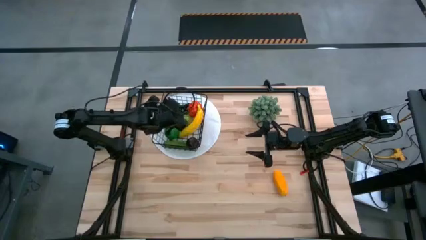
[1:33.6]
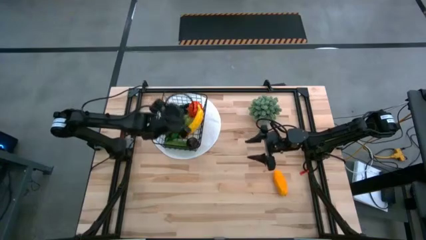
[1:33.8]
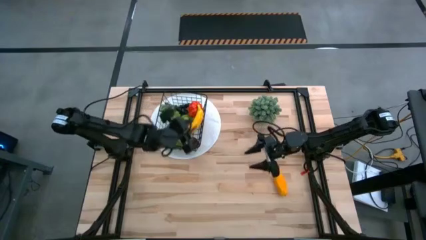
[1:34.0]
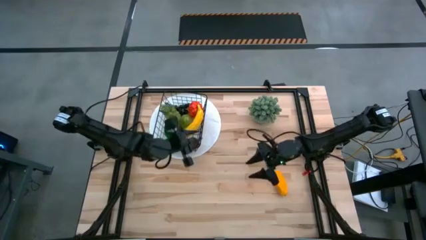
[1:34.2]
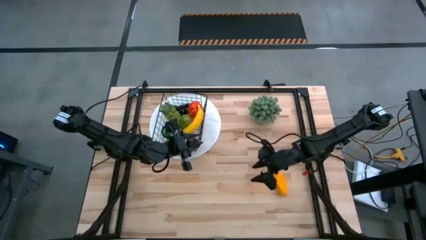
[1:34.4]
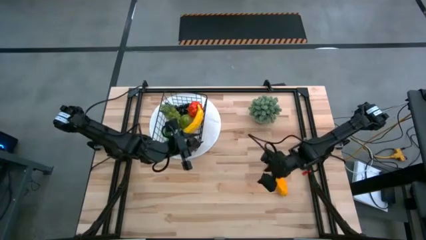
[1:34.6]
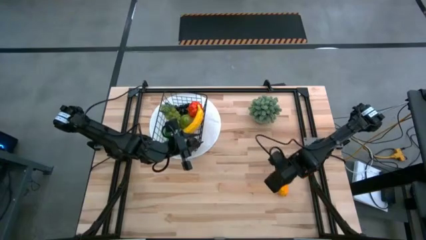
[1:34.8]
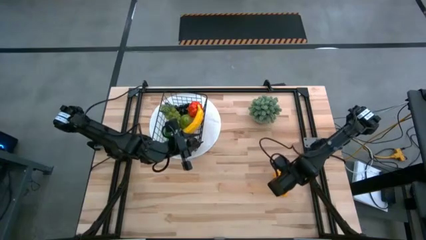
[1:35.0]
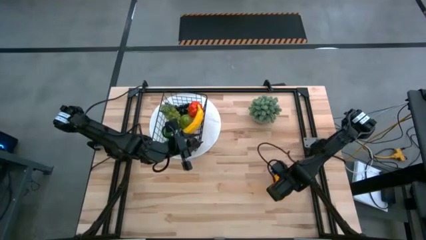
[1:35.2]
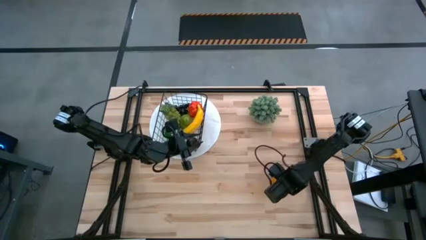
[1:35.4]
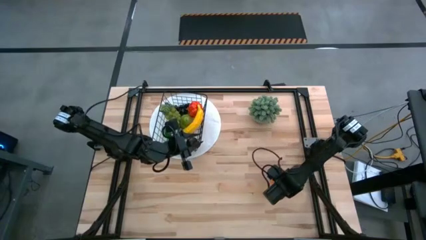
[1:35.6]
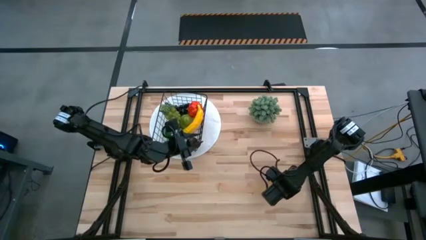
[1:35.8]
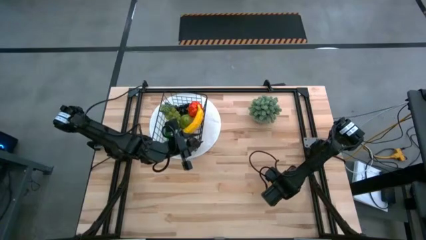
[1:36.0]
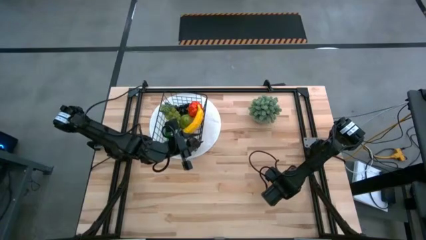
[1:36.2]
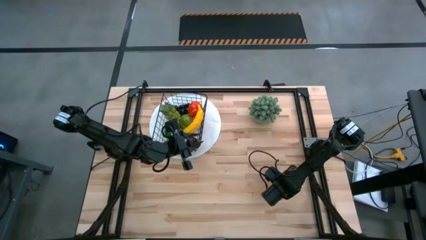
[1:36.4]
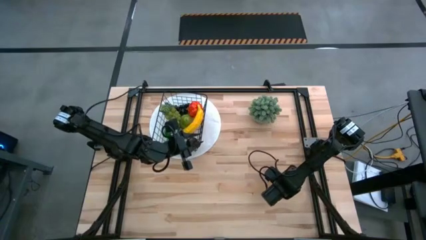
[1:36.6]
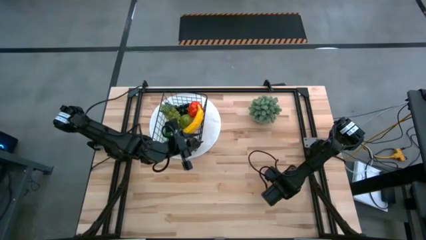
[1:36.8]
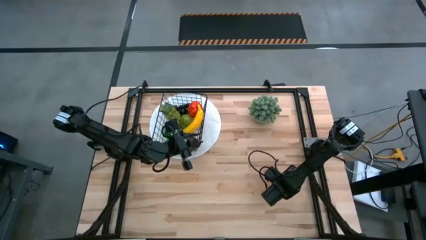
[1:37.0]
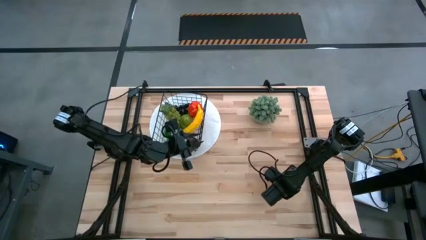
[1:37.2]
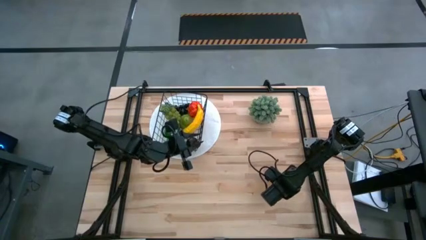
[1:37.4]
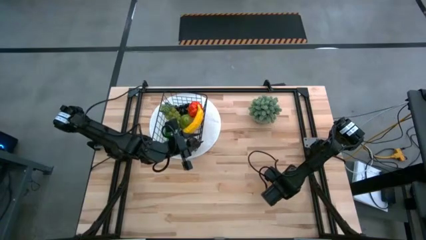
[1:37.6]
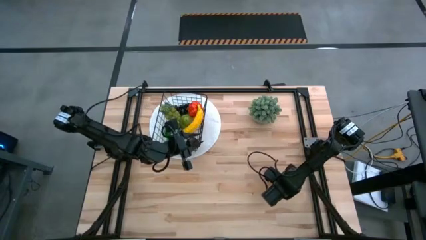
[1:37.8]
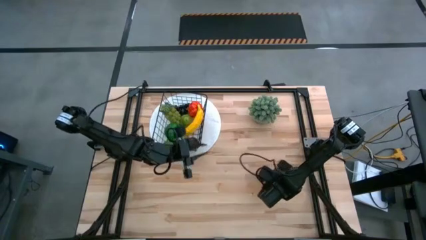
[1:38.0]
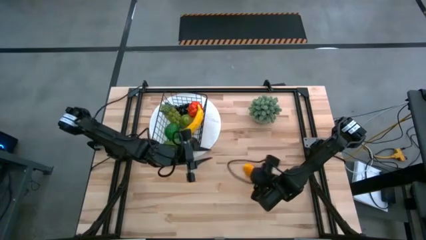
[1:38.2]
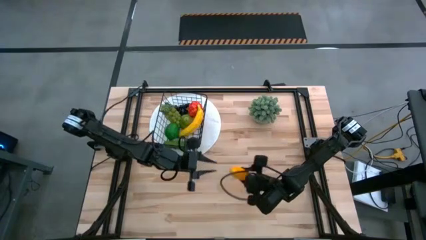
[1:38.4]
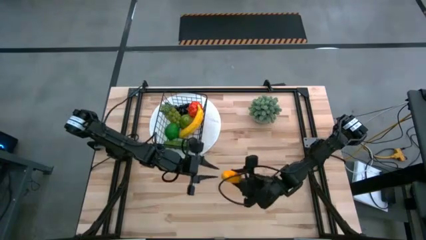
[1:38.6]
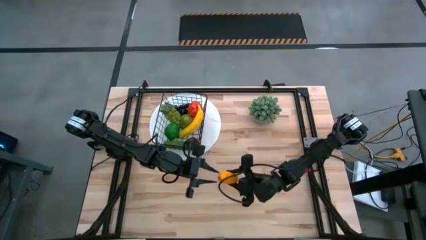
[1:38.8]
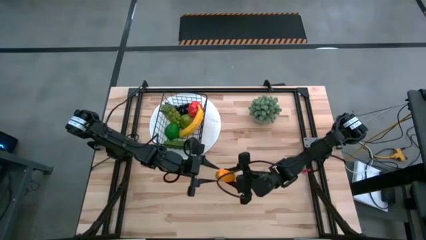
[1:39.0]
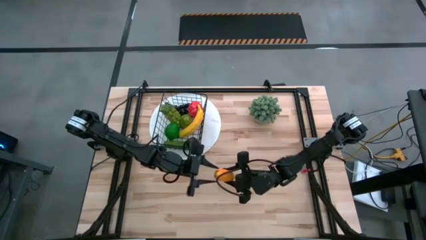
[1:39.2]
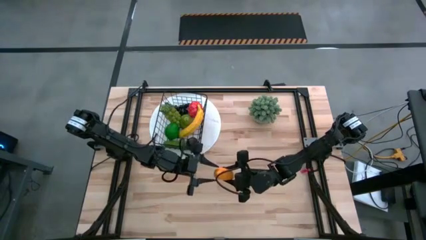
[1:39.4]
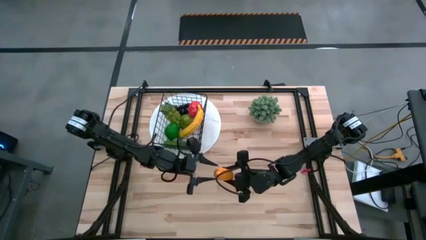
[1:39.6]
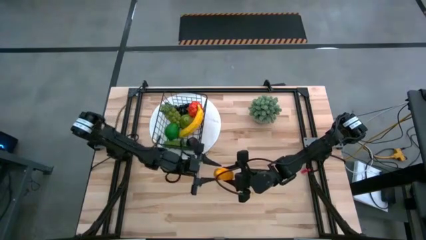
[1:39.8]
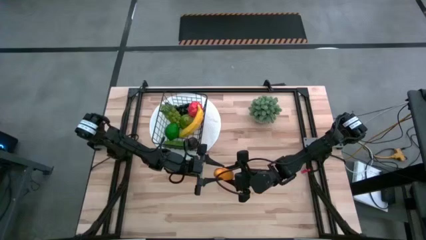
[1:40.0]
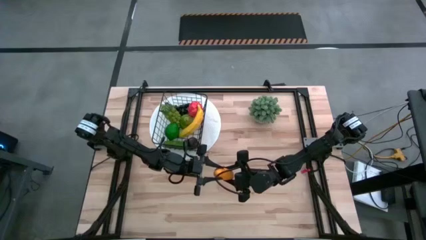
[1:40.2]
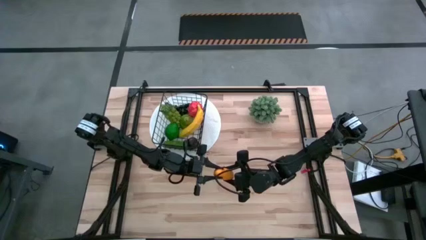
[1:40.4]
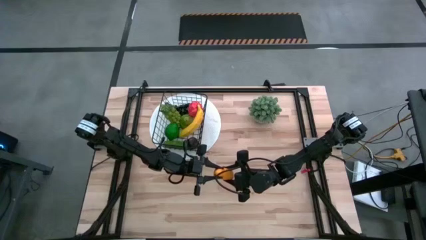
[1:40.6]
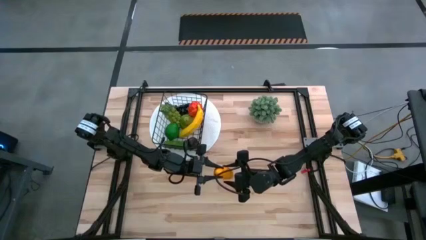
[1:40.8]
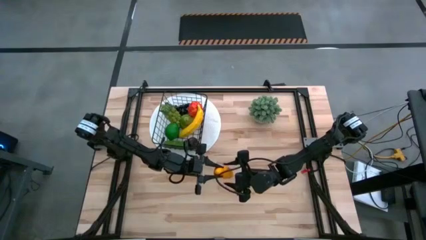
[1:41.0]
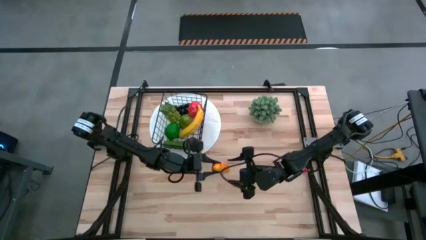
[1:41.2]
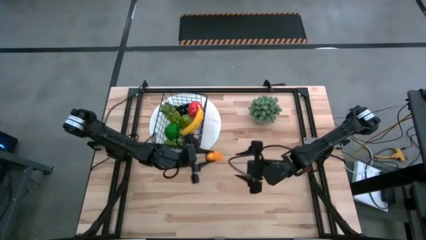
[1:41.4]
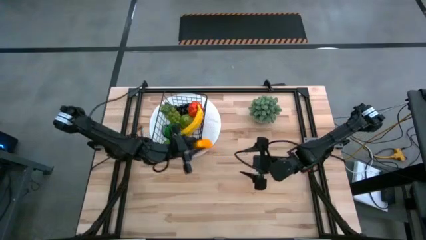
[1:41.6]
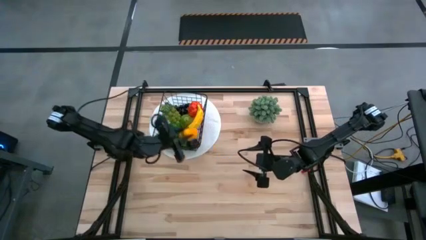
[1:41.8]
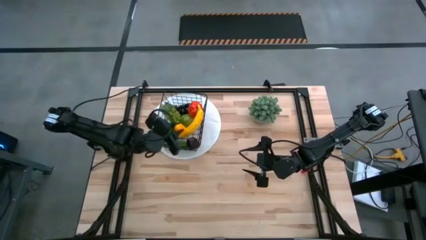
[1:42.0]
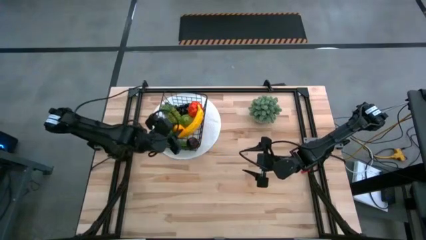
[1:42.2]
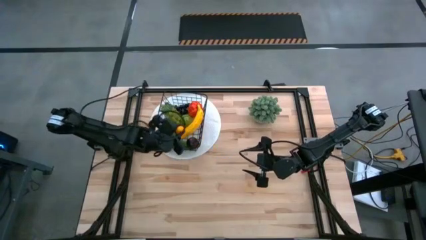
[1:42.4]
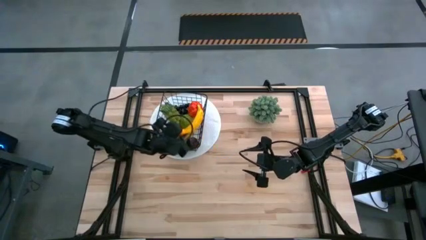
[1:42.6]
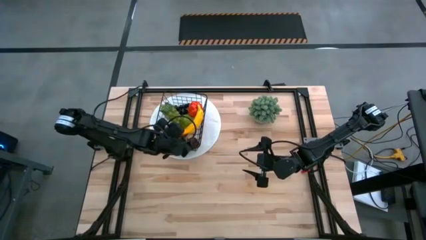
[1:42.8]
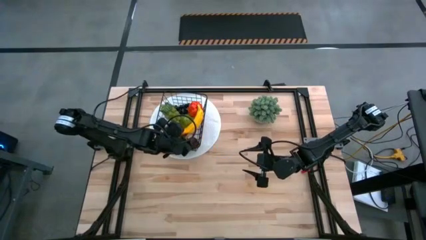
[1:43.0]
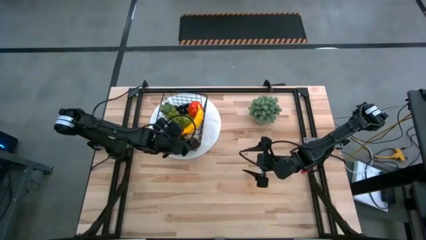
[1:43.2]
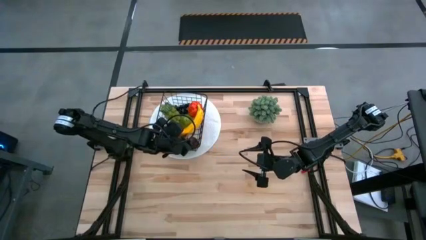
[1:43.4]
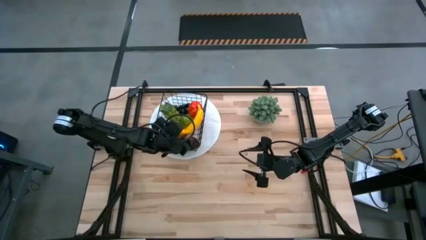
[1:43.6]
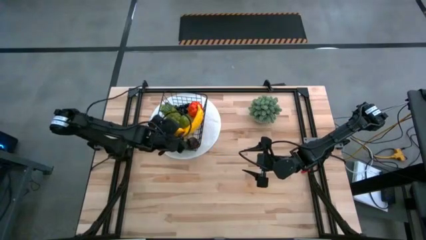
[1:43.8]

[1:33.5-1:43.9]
Task: Build produce basket
Put the yellow mango into the wire basket

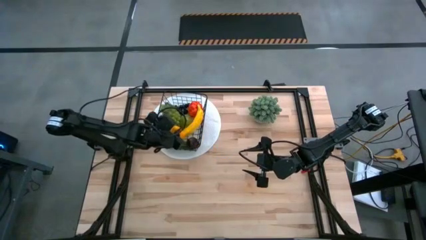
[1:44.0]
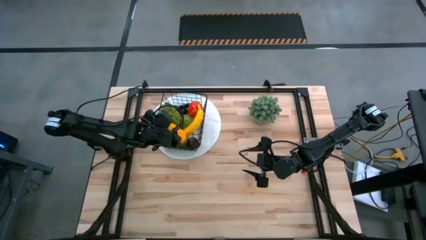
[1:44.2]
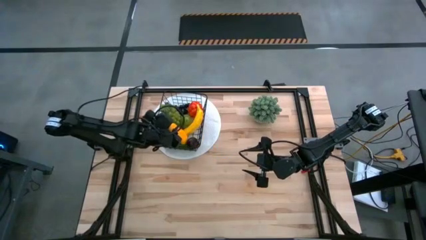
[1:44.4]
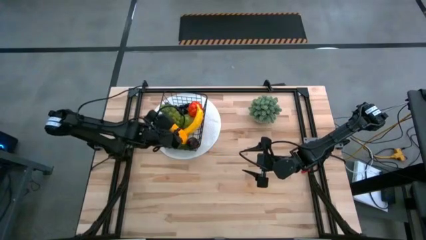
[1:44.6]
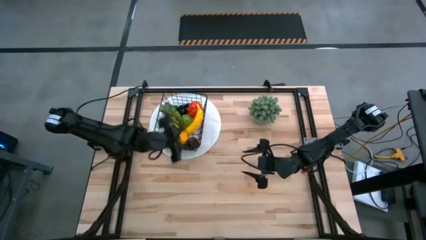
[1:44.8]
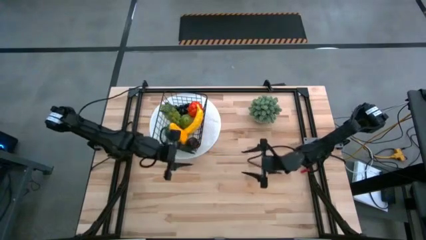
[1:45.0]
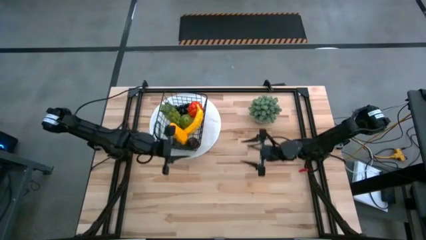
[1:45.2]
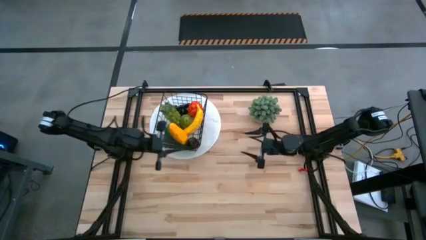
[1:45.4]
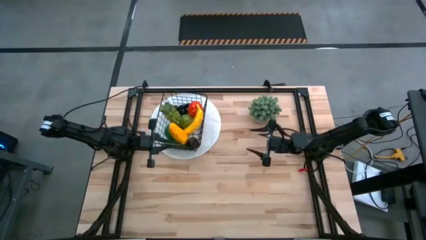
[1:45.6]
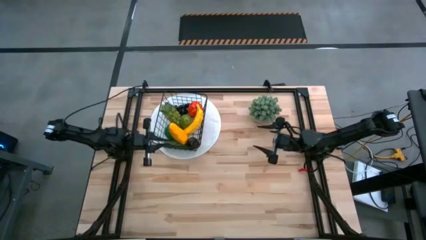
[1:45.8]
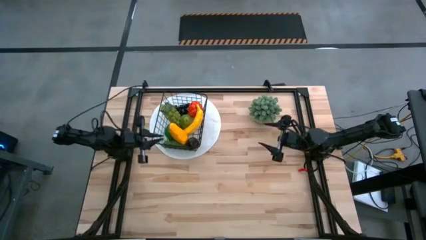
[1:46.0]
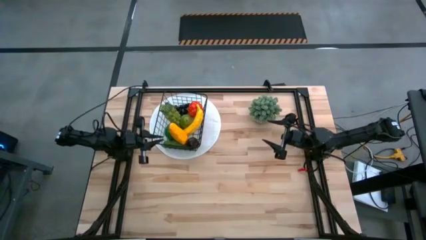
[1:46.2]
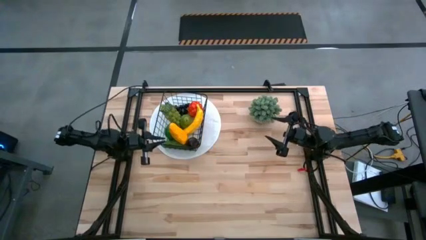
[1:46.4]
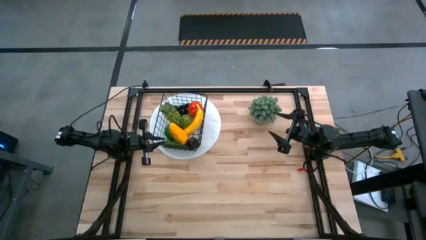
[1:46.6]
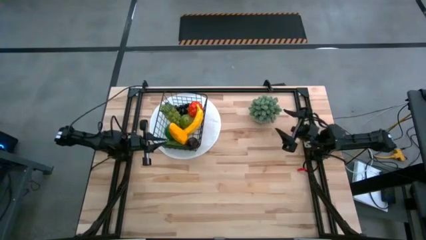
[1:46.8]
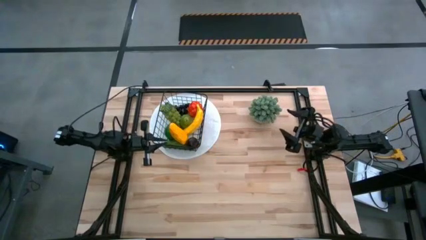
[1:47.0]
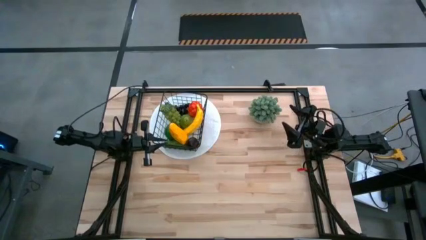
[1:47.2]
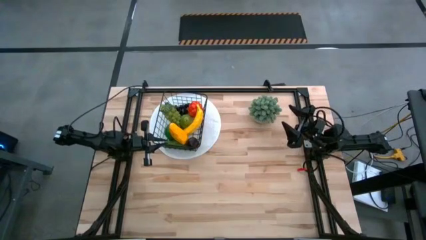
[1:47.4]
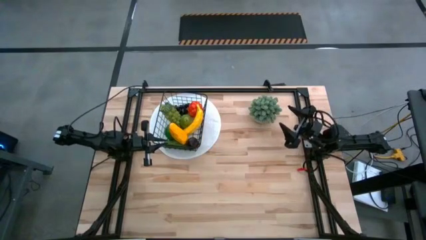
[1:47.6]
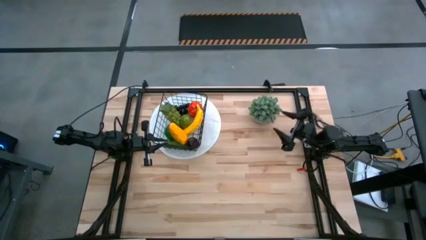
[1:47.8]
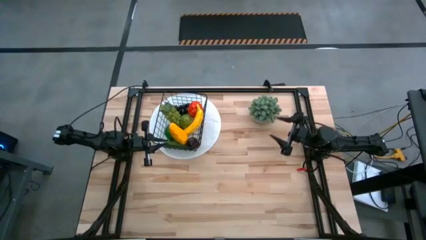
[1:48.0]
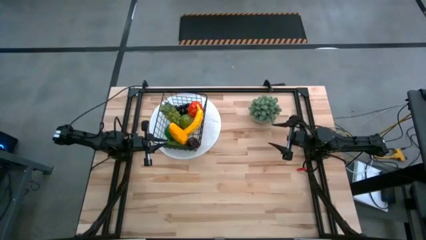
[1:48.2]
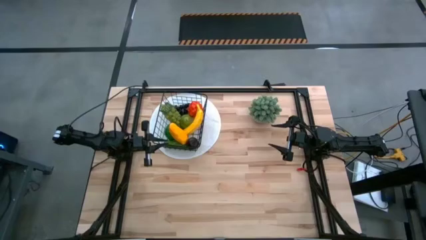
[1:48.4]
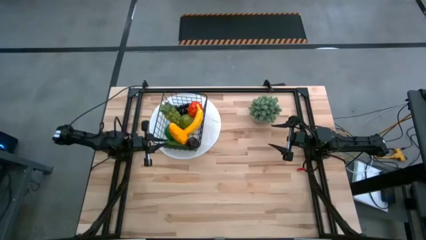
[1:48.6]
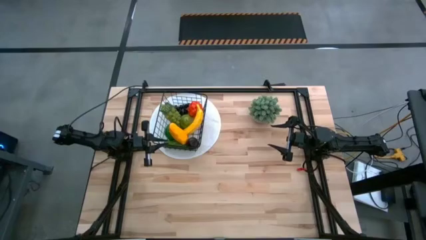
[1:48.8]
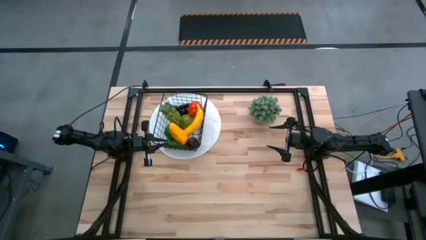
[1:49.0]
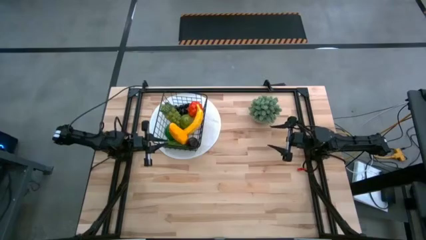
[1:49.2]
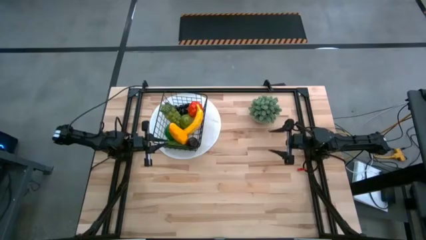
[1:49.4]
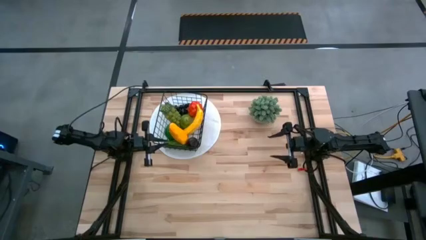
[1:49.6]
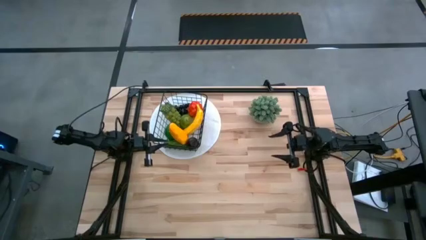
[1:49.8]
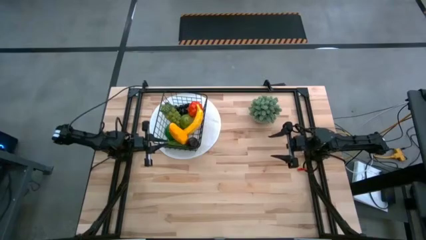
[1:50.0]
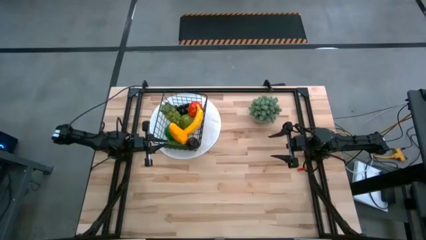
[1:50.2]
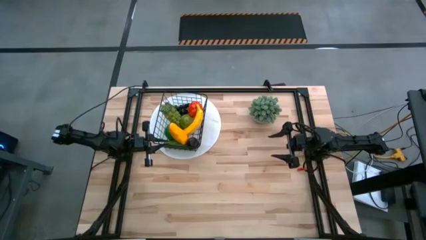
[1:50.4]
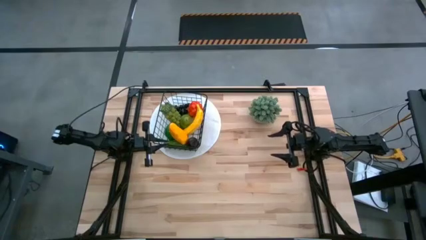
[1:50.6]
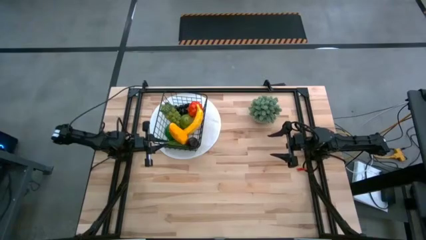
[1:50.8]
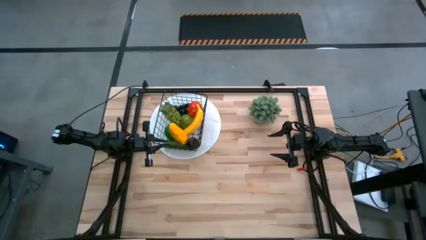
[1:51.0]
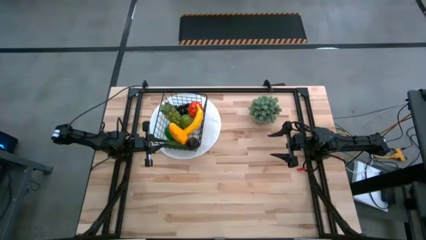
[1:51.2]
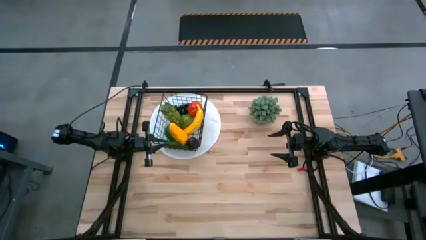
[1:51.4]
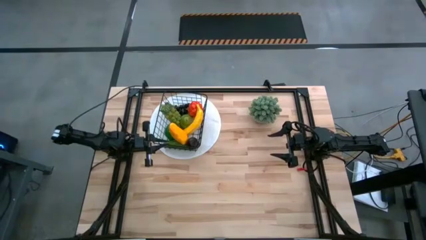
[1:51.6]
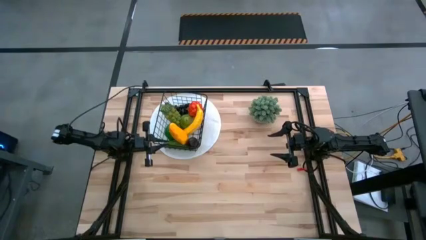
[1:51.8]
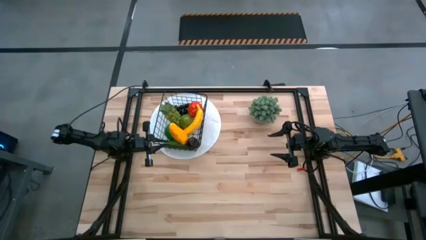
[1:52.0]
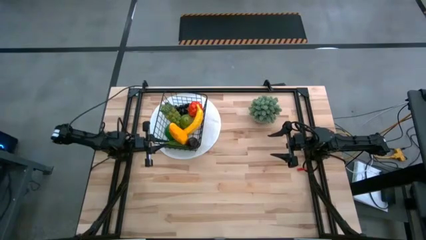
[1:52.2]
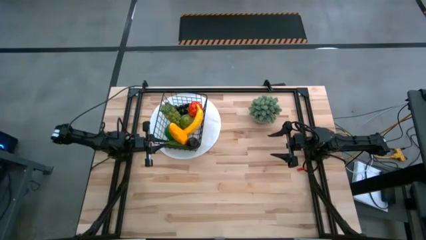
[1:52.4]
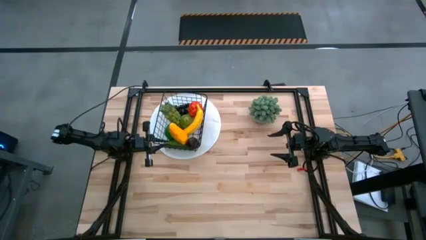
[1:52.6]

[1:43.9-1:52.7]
Return to Home Position
